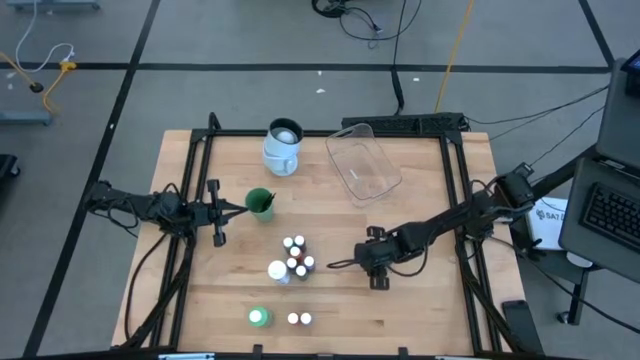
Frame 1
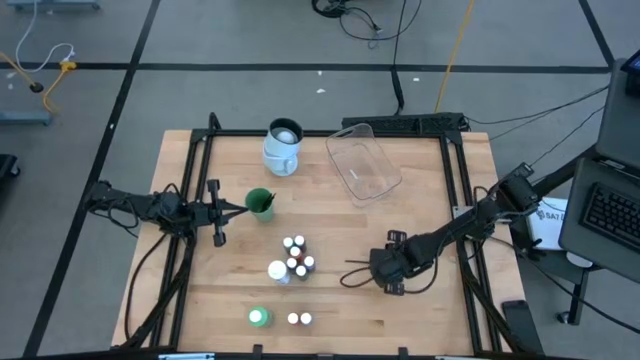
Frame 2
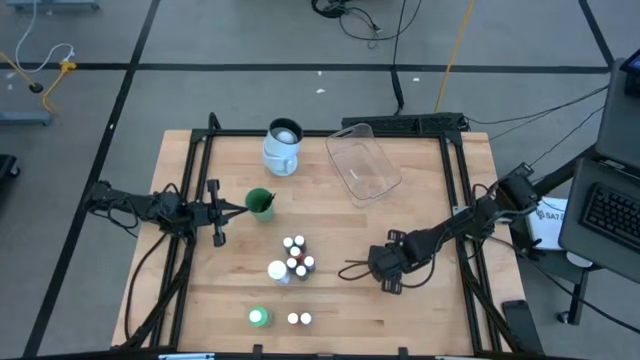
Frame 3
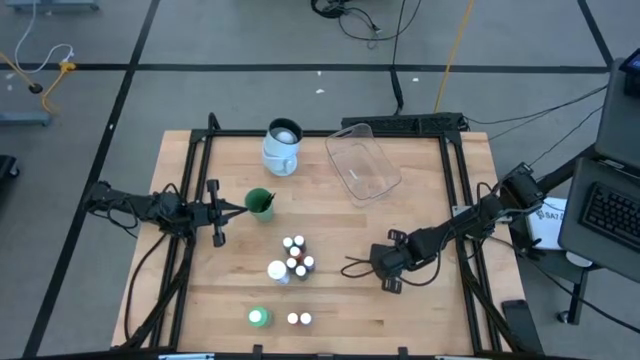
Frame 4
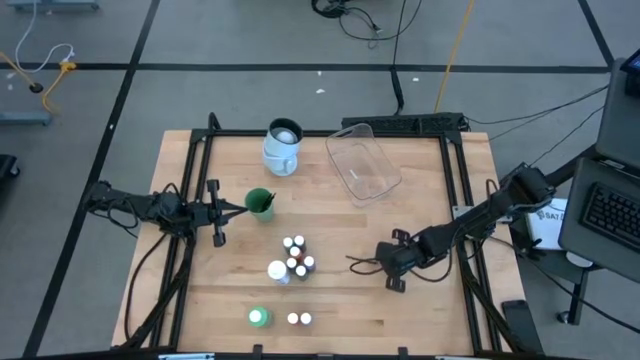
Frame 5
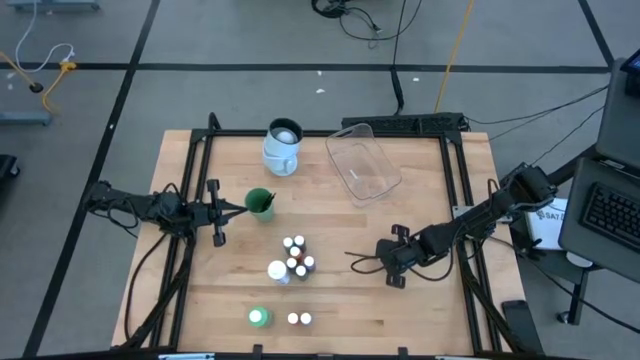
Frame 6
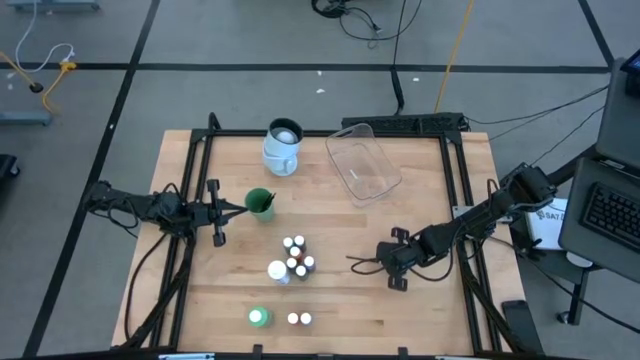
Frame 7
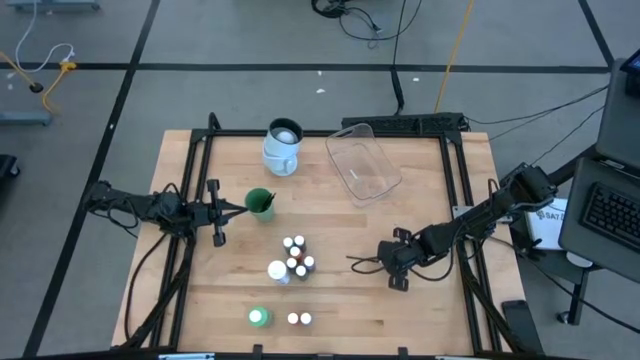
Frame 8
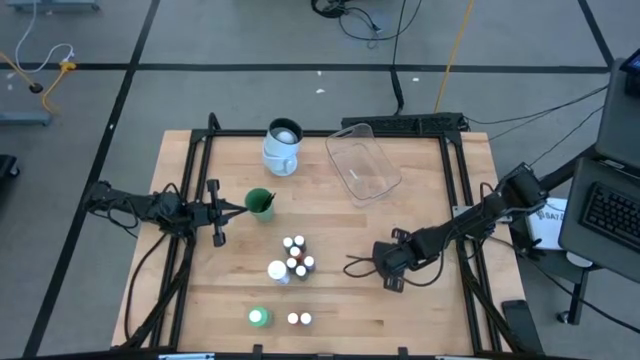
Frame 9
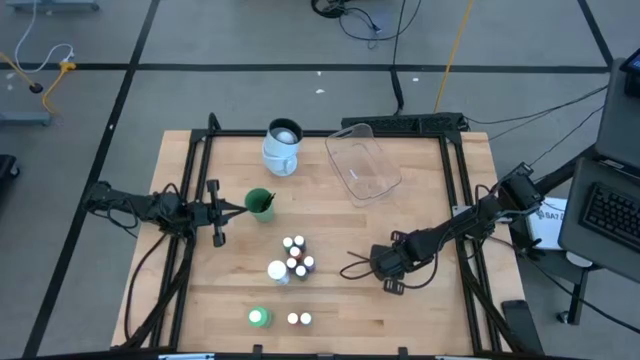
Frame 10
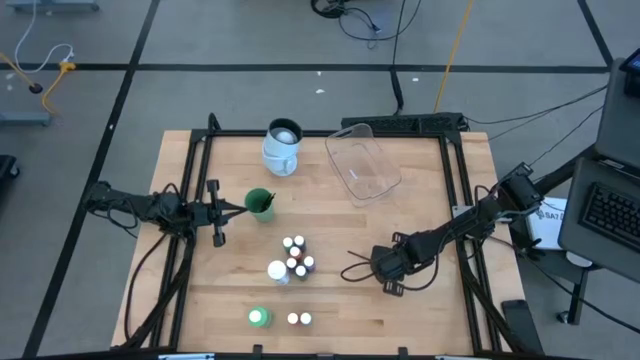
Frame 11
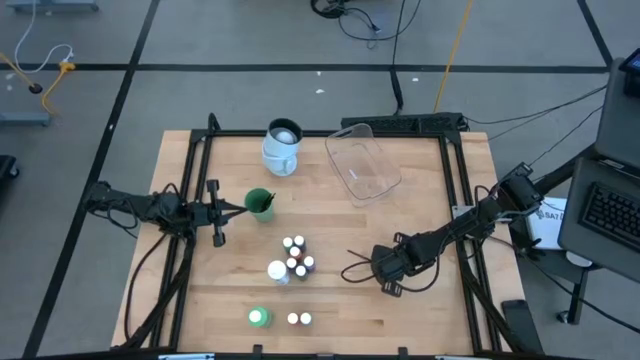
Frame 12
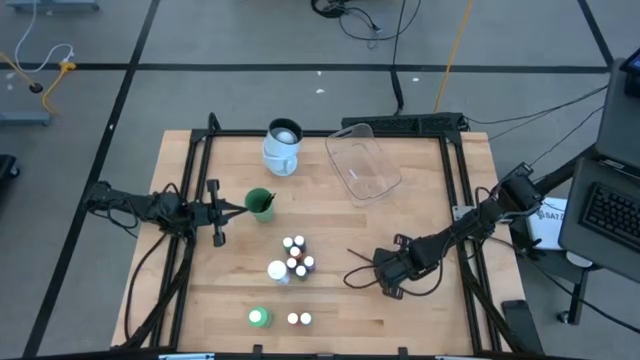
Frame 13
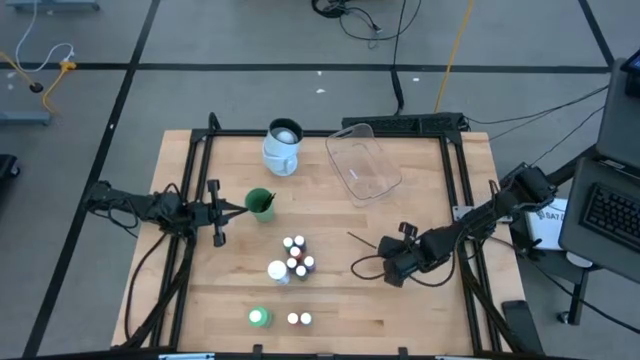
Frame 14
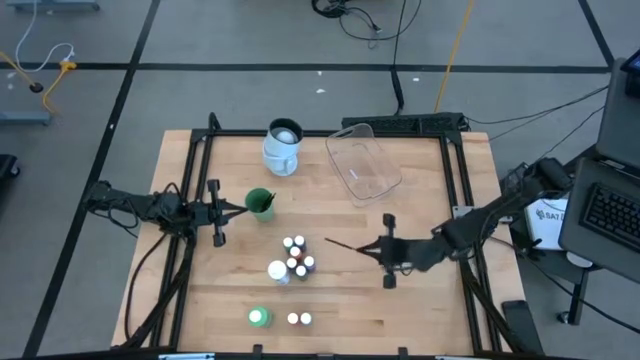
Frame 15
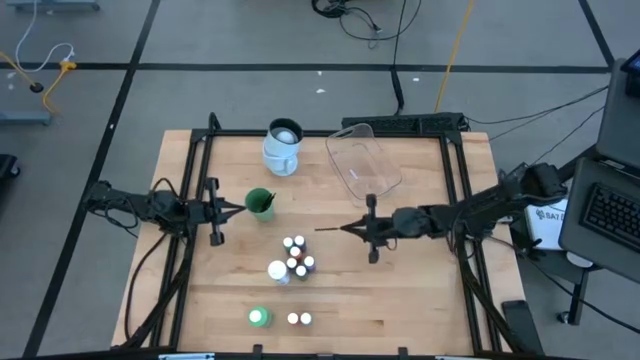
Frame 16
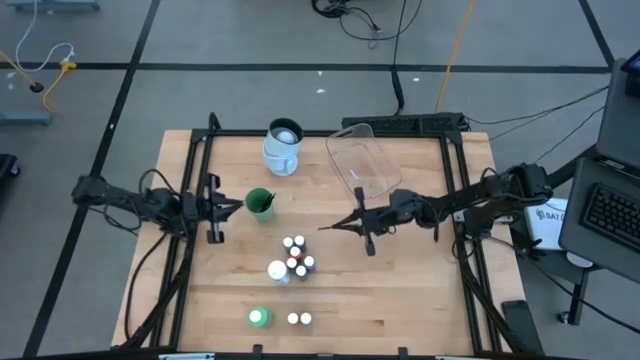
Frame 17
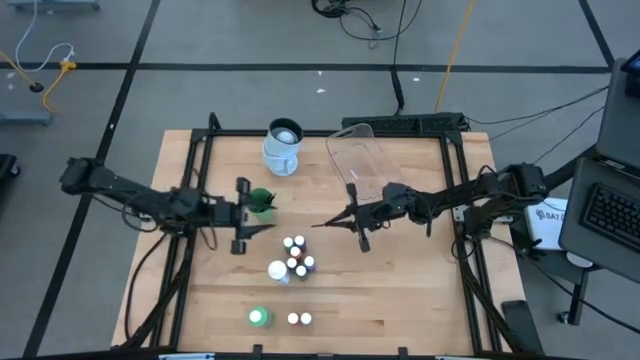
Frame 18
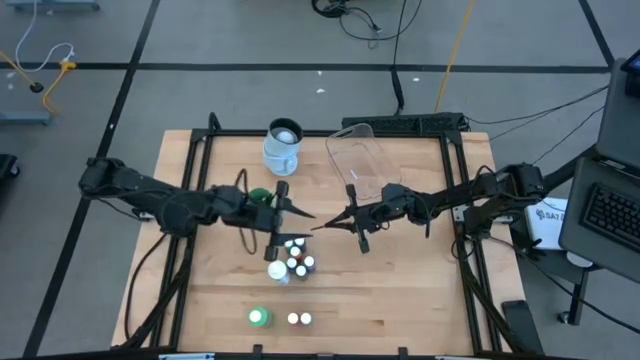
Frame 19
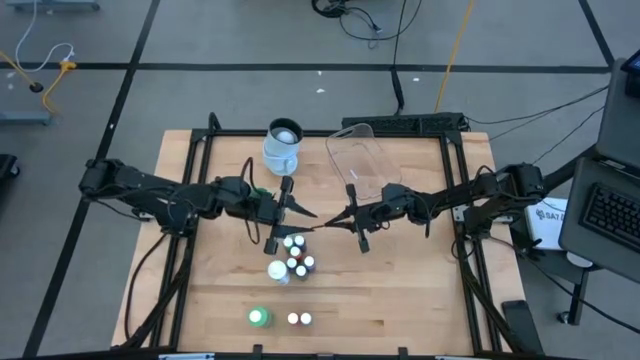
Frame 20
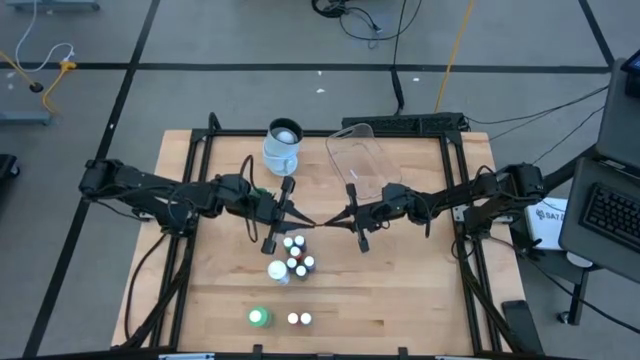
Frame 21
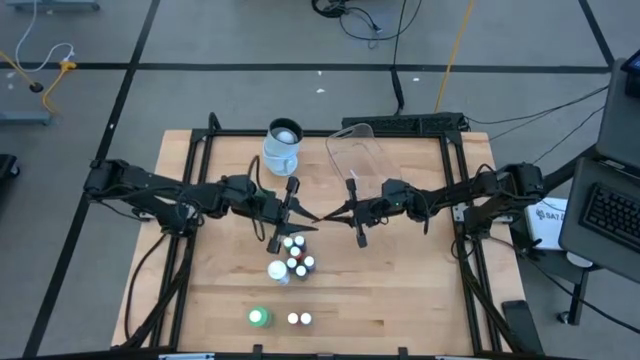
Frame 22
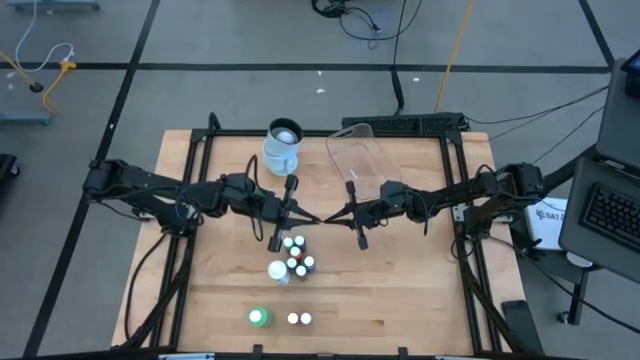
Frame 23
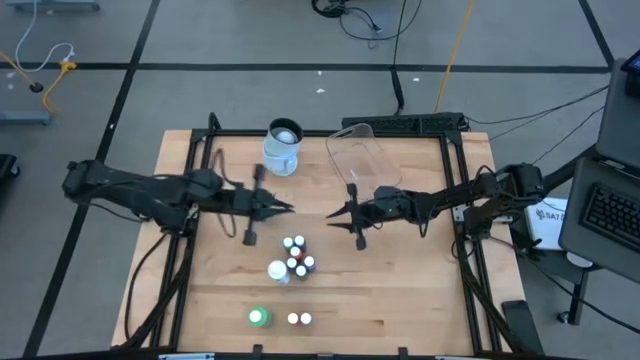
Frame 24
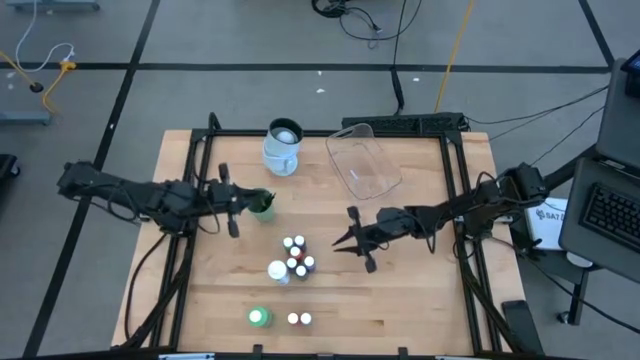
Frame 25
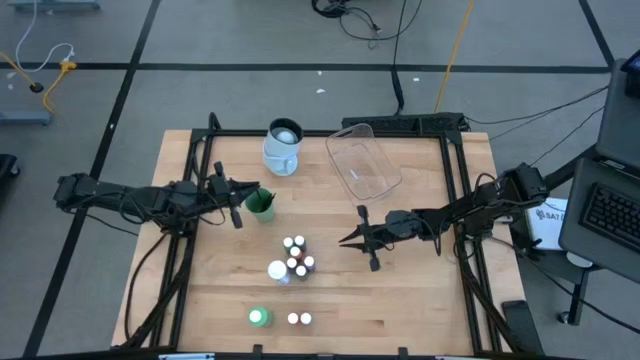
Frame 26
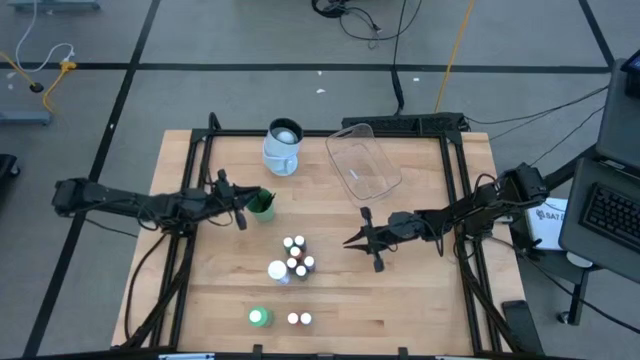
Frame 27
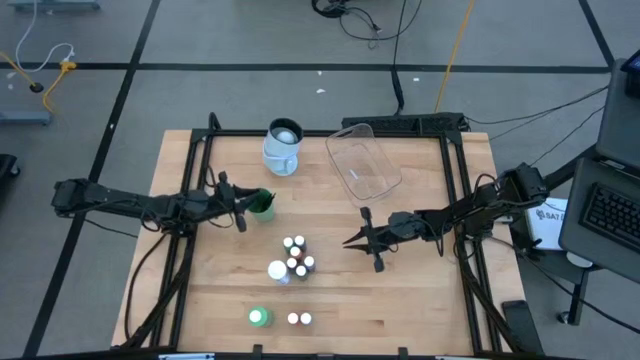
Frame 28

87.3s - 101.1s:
Task: Pick & Place Paint Supplies
Put the silver paintbrush into the green cup

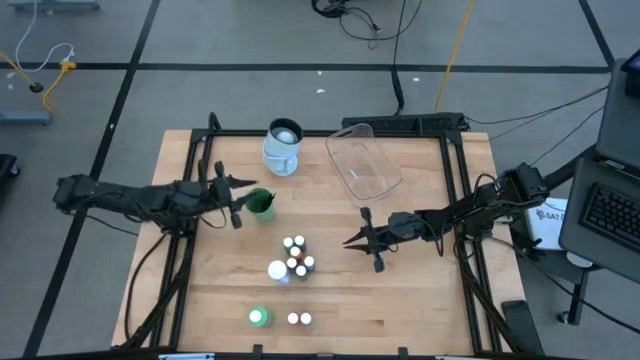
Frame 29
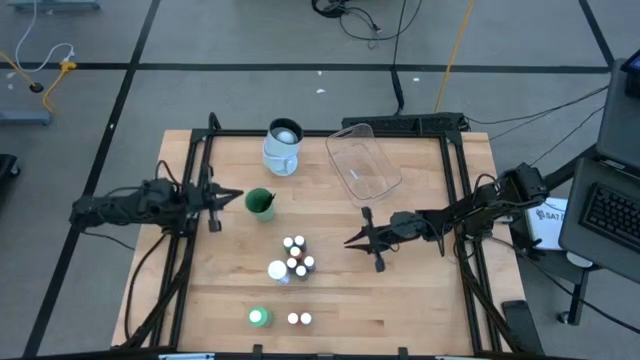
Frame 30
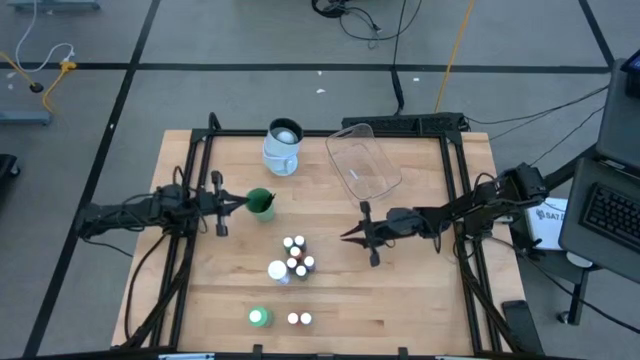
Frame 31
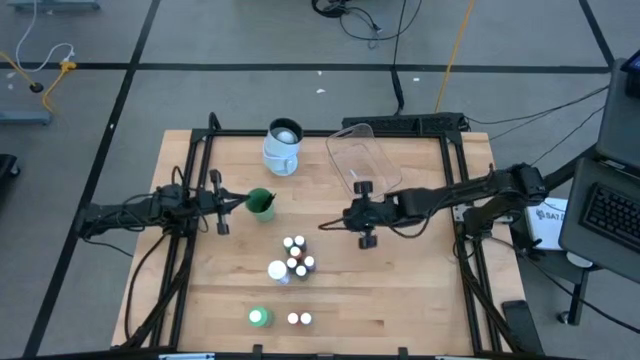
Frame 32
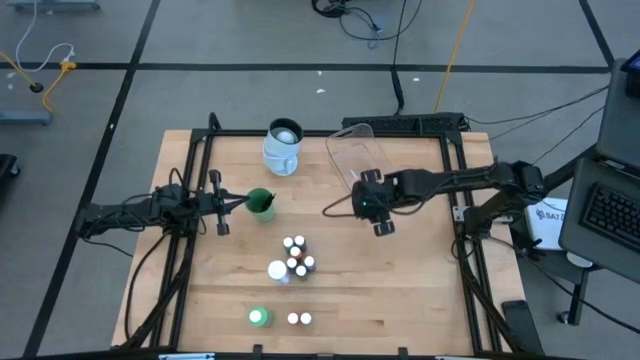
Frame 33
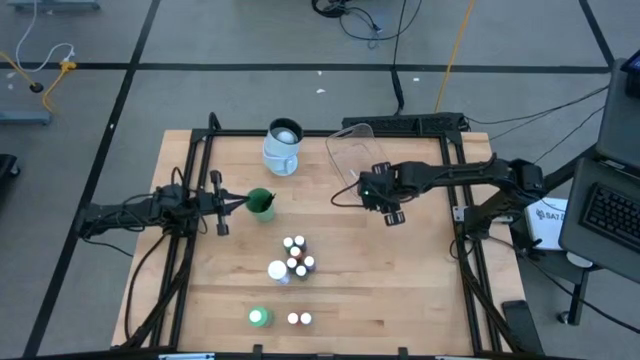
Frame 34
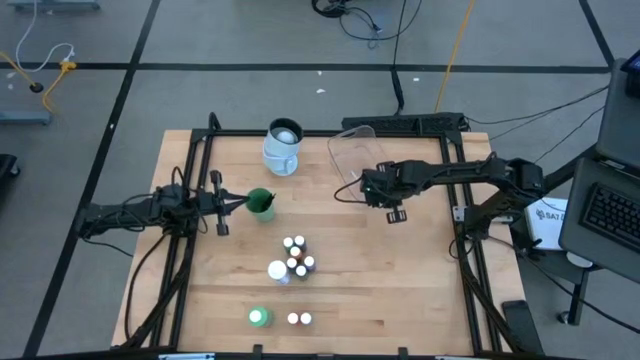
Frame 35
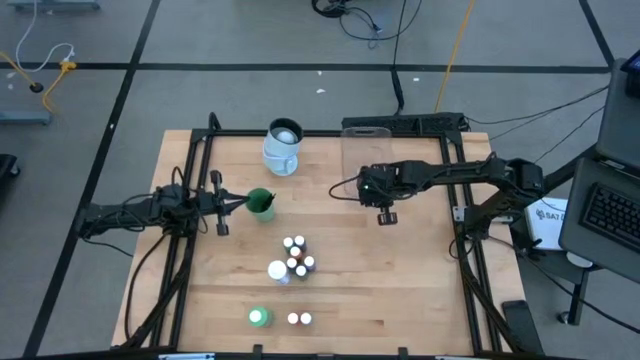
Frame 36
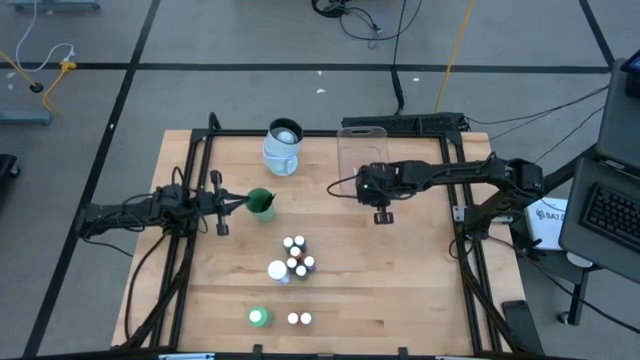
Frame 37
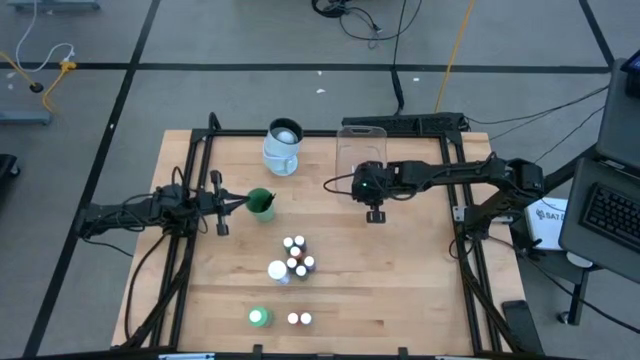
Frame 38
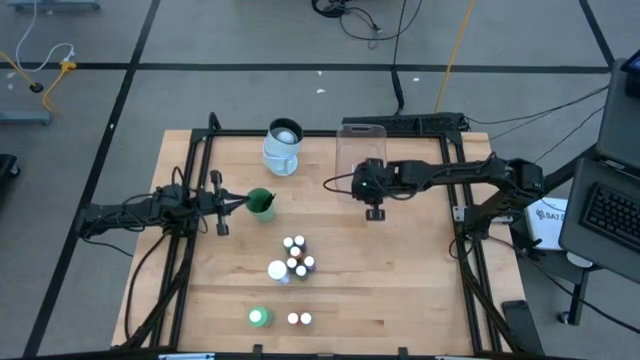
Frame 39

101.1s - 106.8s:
Adjust the transparent bin

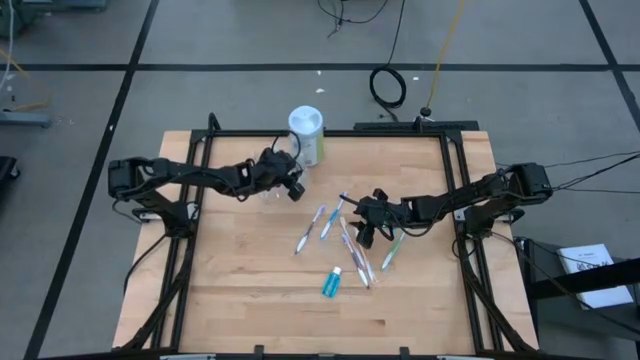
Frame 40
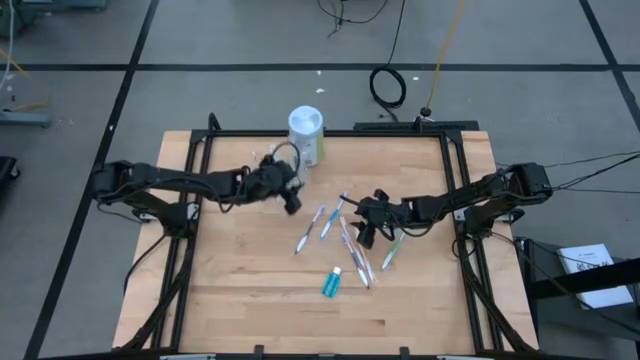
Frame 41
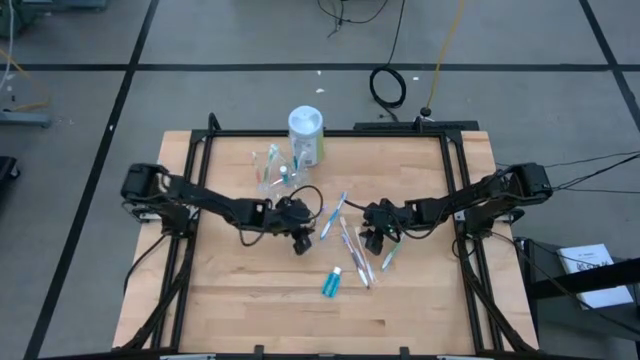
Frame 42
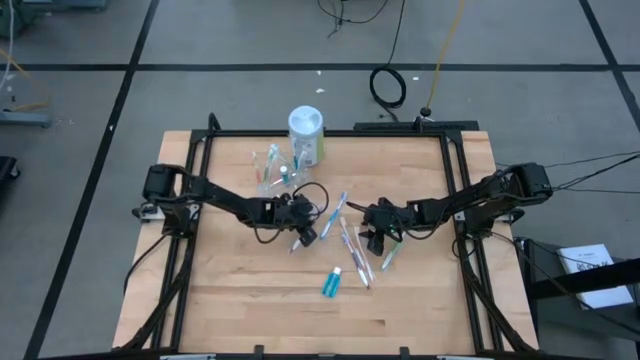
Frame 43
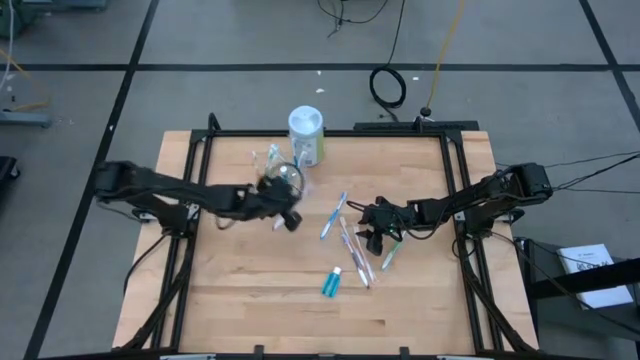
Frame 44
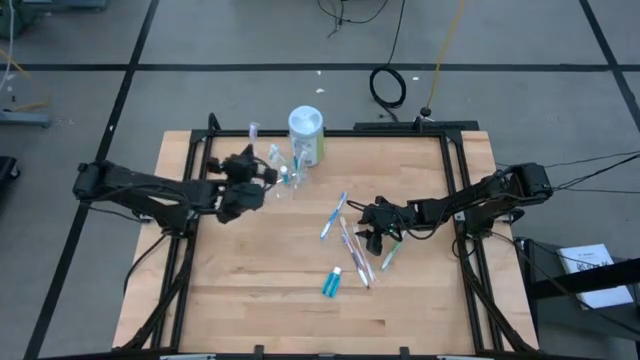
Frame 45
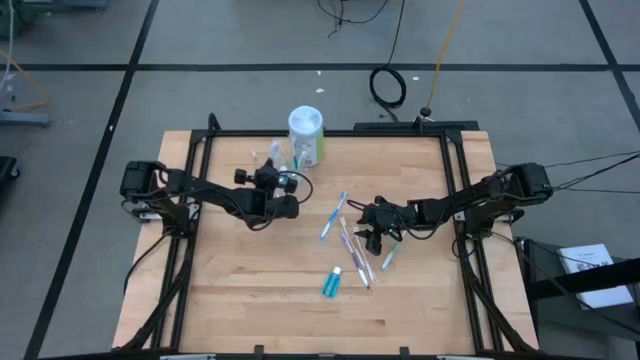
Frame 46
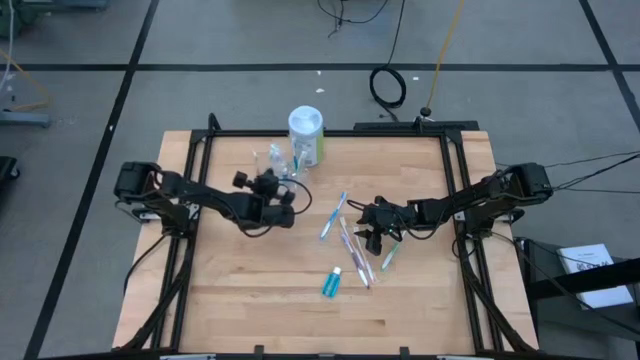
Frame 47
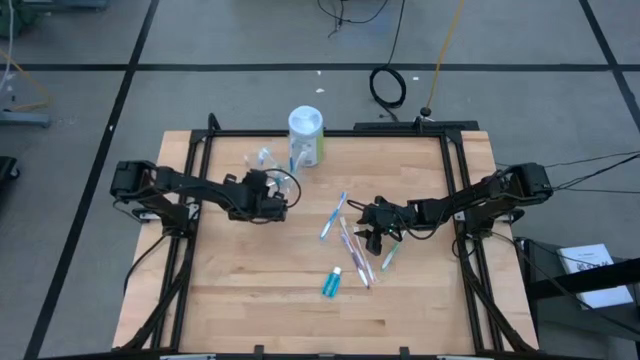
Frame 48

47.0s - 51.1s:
Task: Pick & Place toothbrushing station
Put the top purple toothbrush into the transparent organizer
